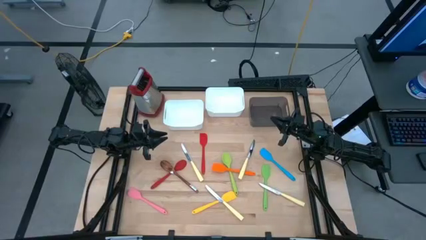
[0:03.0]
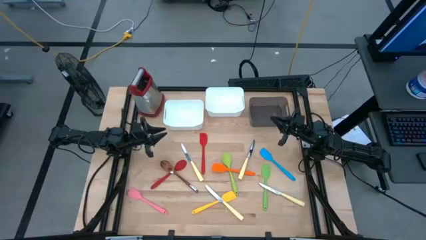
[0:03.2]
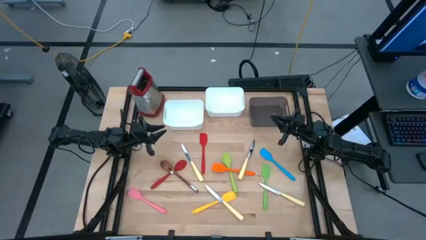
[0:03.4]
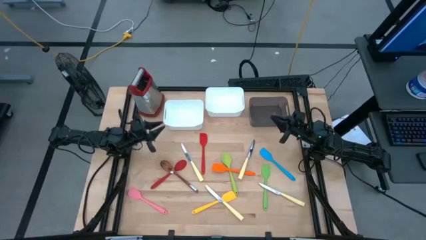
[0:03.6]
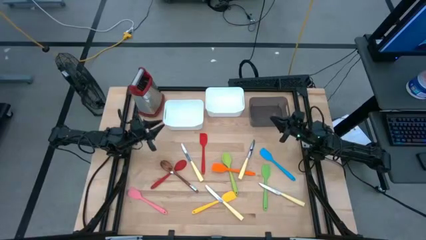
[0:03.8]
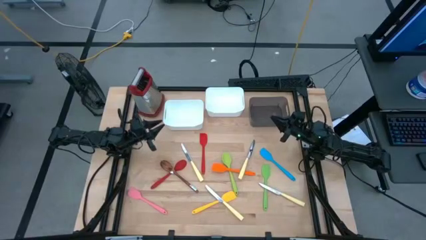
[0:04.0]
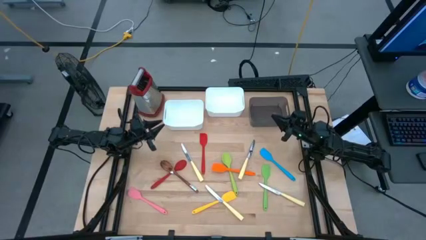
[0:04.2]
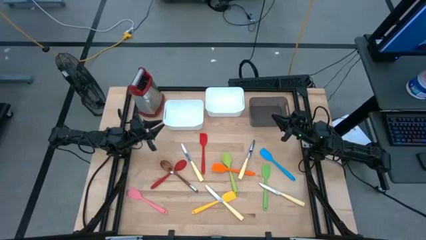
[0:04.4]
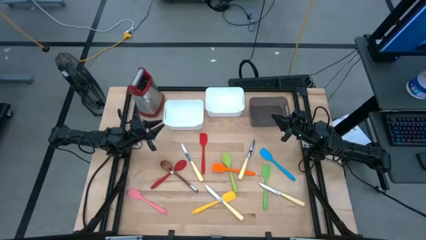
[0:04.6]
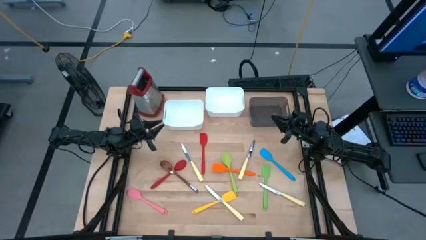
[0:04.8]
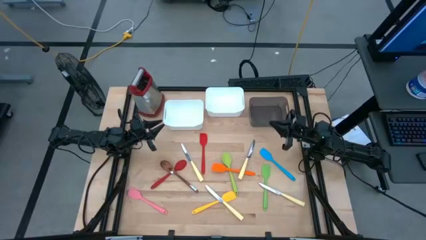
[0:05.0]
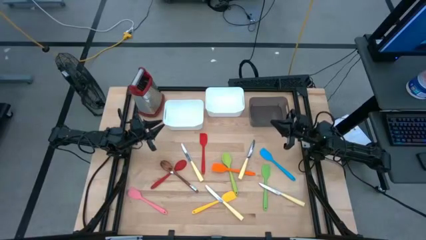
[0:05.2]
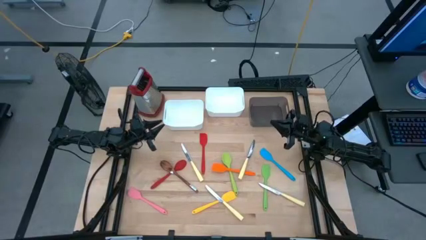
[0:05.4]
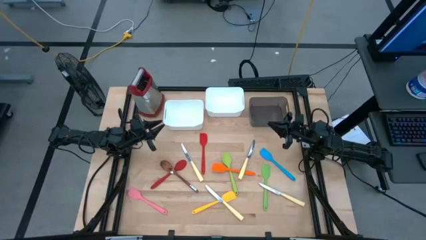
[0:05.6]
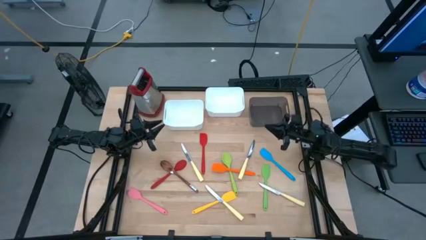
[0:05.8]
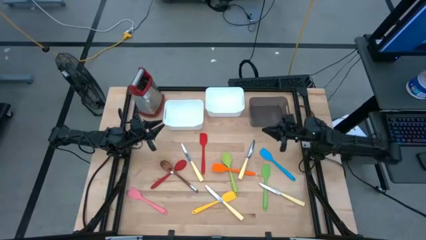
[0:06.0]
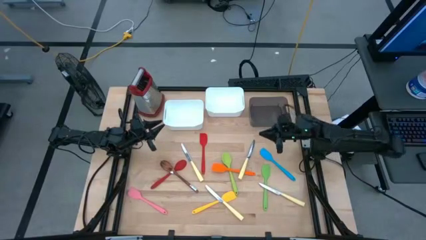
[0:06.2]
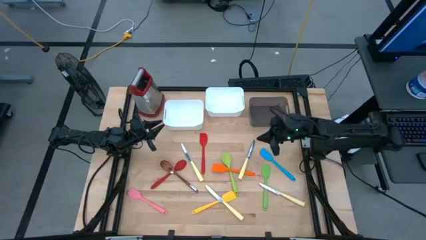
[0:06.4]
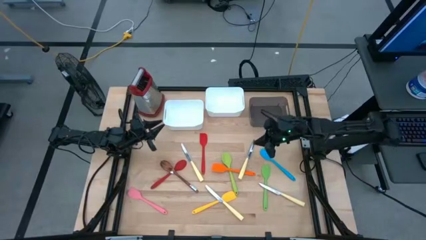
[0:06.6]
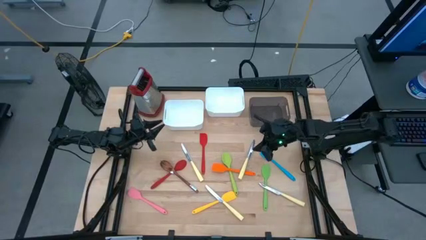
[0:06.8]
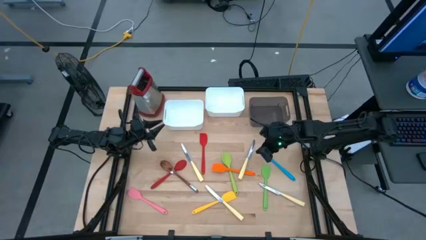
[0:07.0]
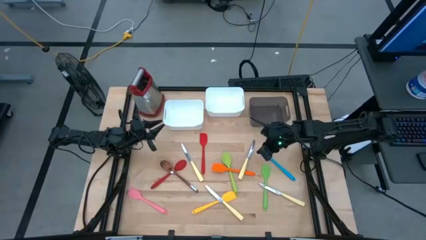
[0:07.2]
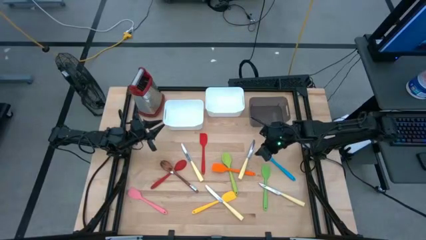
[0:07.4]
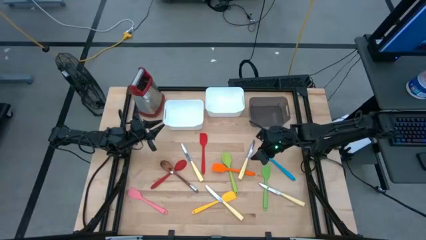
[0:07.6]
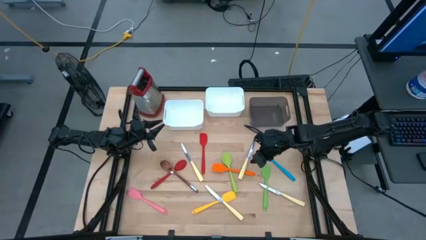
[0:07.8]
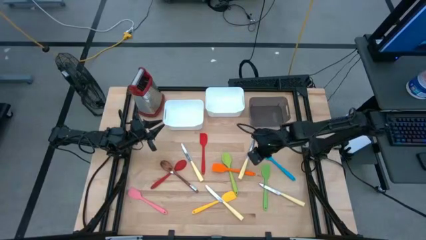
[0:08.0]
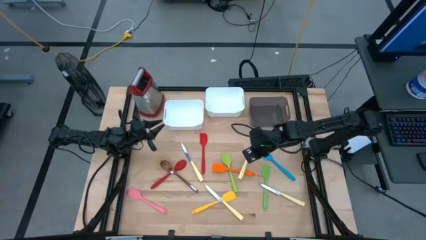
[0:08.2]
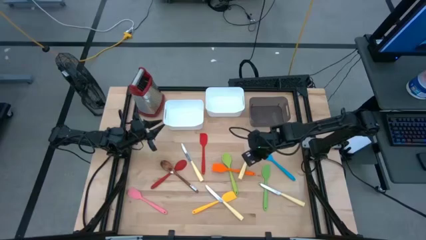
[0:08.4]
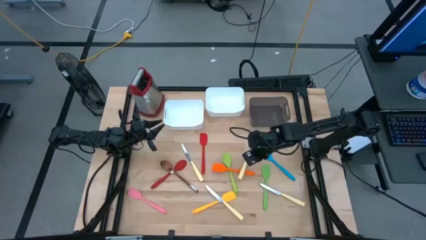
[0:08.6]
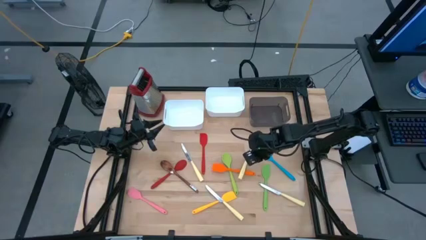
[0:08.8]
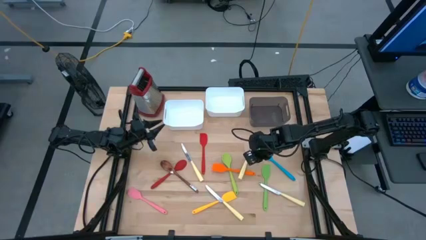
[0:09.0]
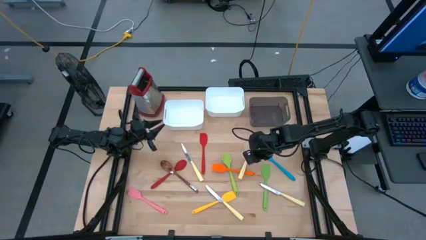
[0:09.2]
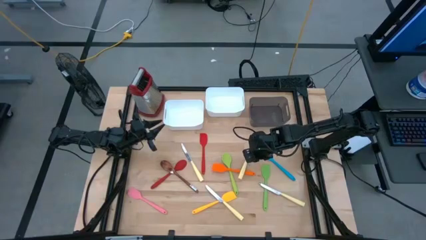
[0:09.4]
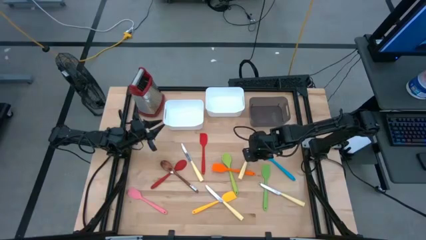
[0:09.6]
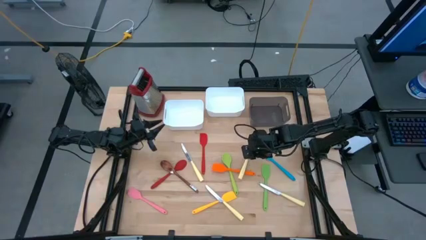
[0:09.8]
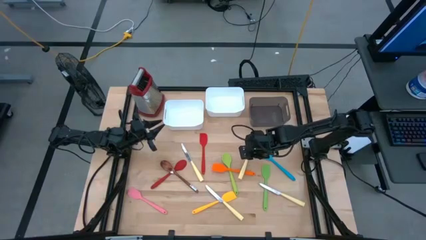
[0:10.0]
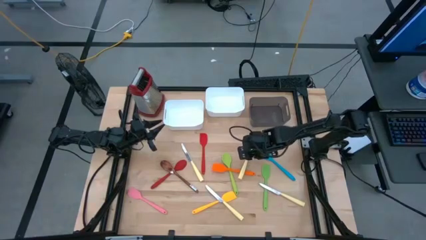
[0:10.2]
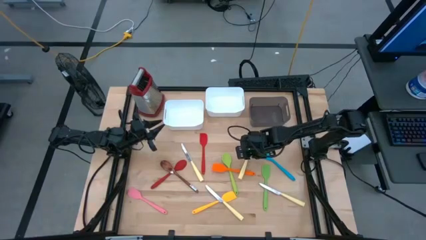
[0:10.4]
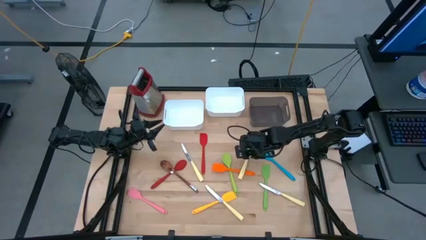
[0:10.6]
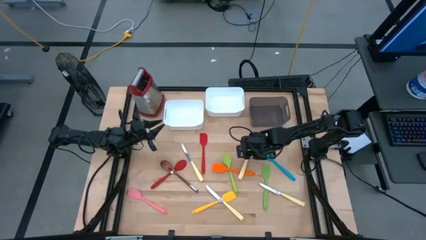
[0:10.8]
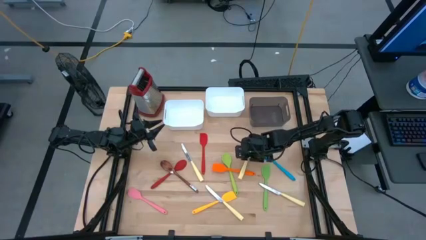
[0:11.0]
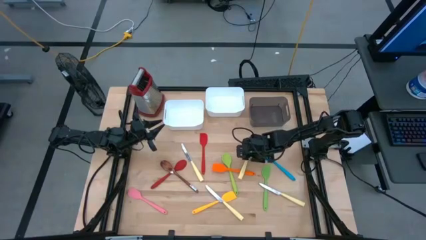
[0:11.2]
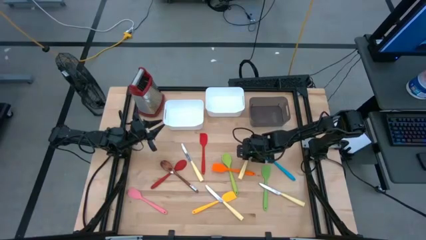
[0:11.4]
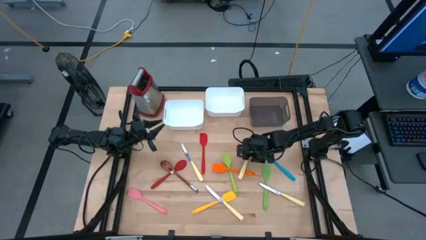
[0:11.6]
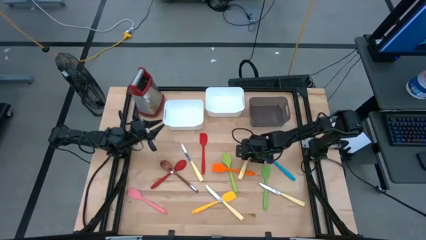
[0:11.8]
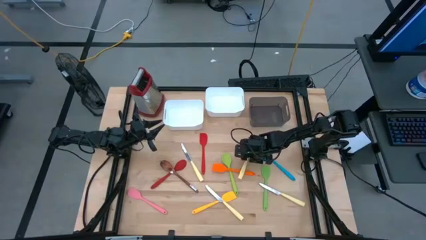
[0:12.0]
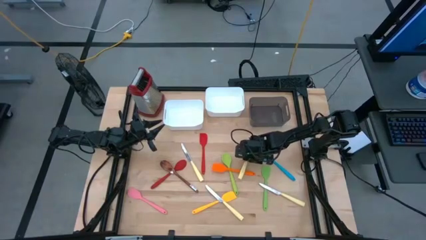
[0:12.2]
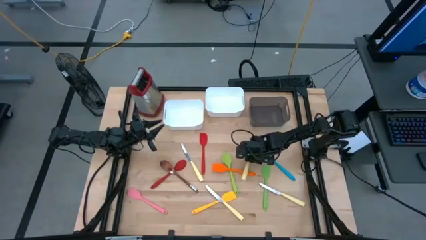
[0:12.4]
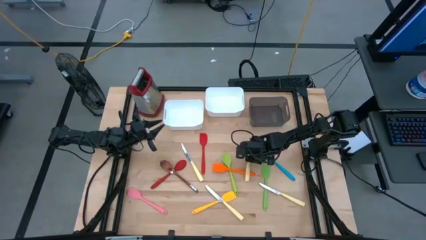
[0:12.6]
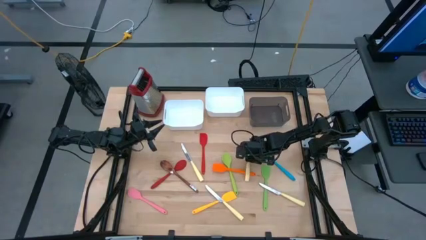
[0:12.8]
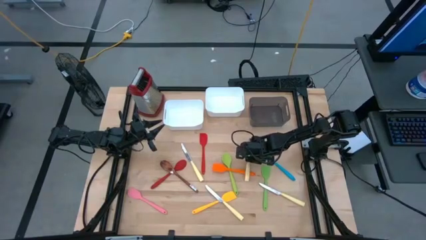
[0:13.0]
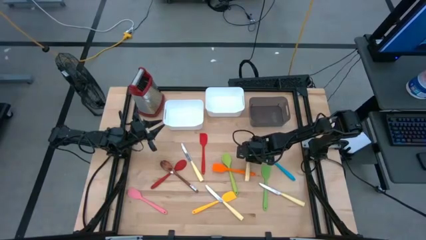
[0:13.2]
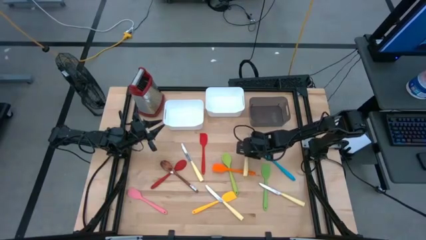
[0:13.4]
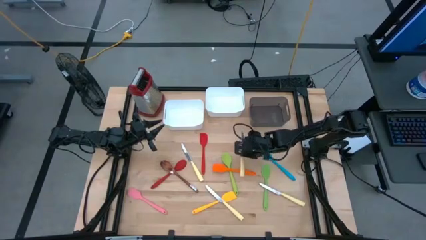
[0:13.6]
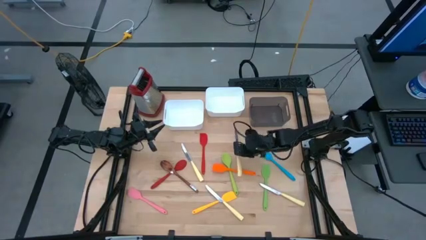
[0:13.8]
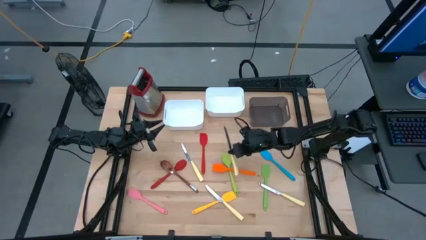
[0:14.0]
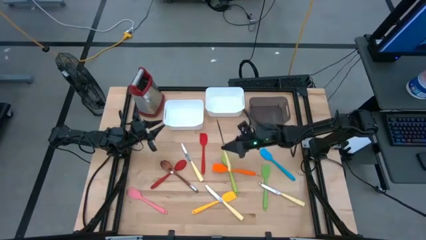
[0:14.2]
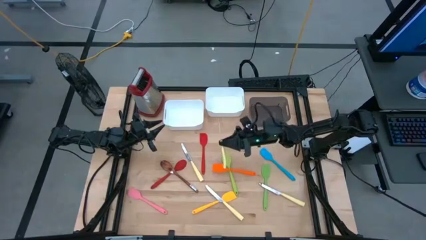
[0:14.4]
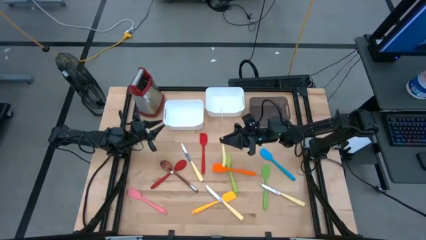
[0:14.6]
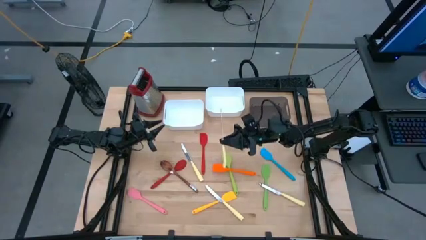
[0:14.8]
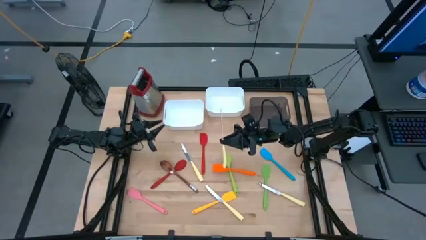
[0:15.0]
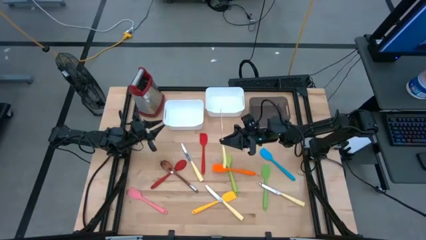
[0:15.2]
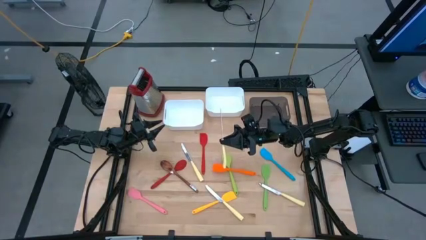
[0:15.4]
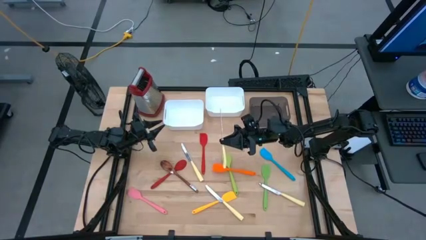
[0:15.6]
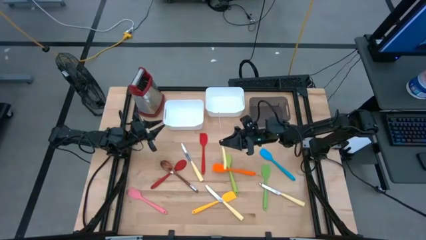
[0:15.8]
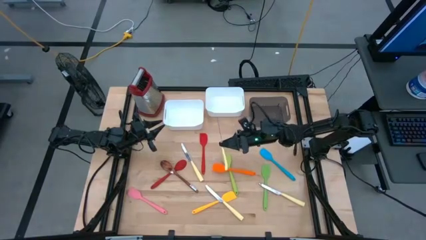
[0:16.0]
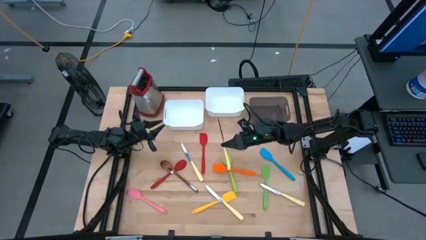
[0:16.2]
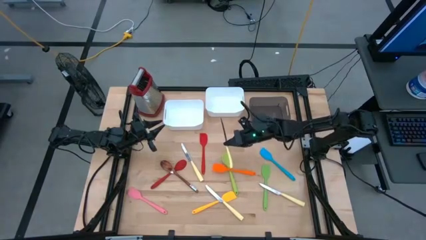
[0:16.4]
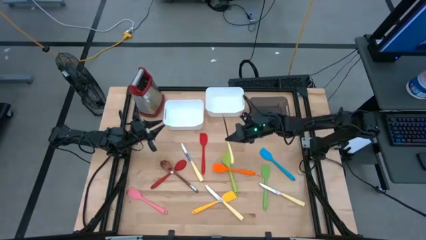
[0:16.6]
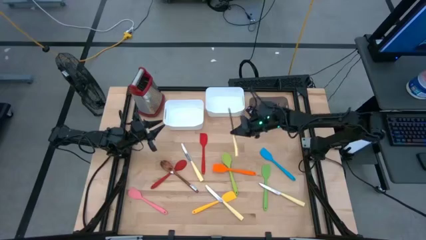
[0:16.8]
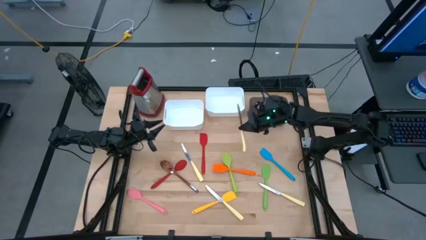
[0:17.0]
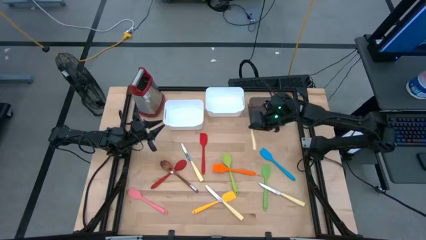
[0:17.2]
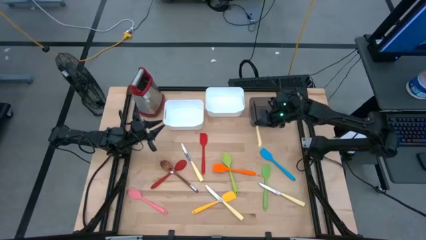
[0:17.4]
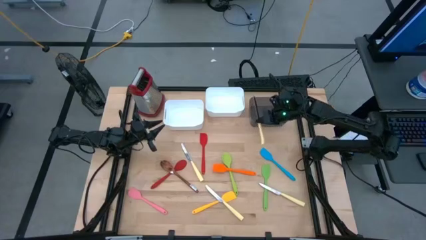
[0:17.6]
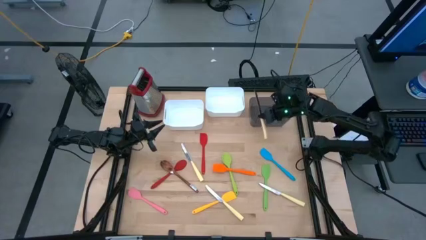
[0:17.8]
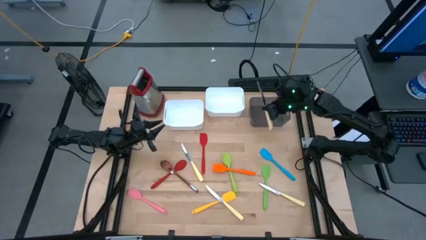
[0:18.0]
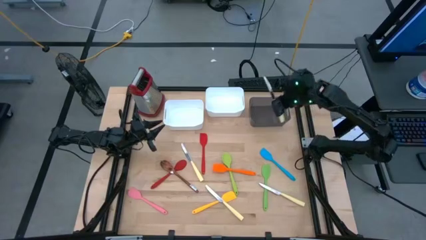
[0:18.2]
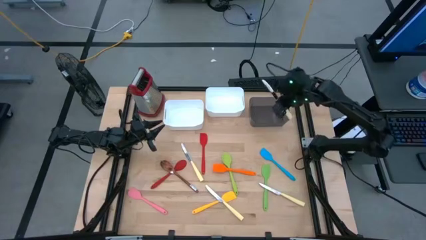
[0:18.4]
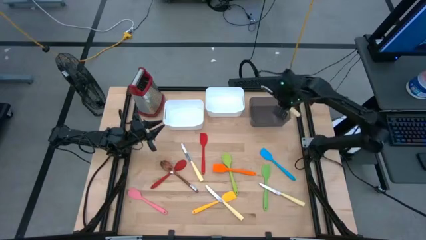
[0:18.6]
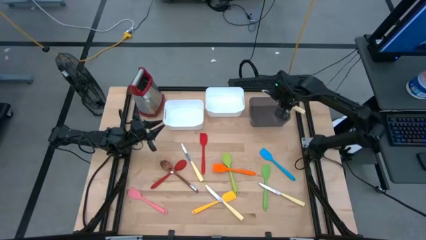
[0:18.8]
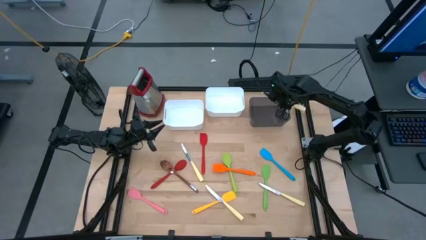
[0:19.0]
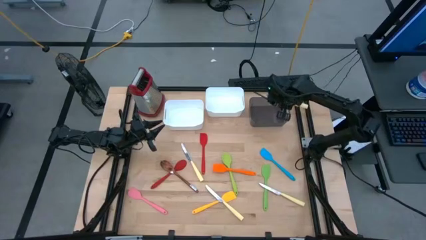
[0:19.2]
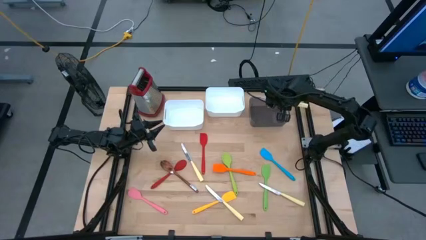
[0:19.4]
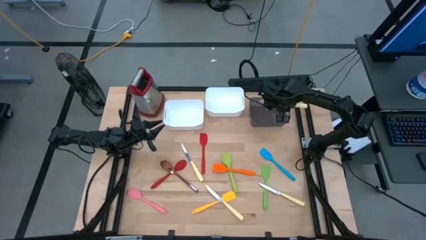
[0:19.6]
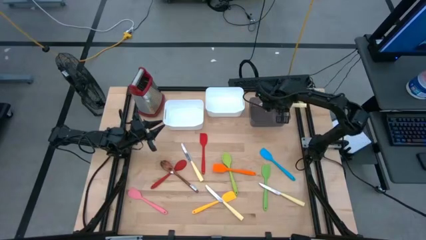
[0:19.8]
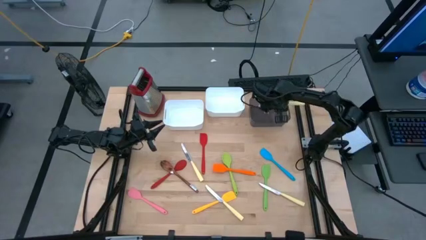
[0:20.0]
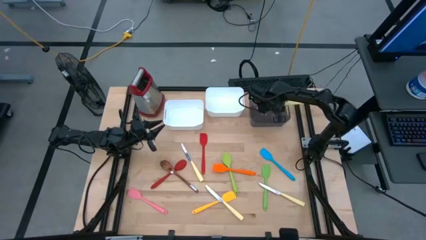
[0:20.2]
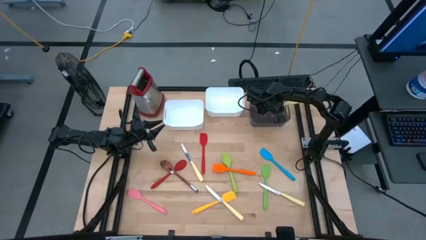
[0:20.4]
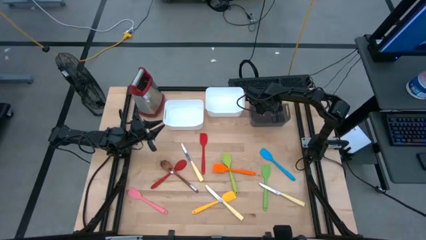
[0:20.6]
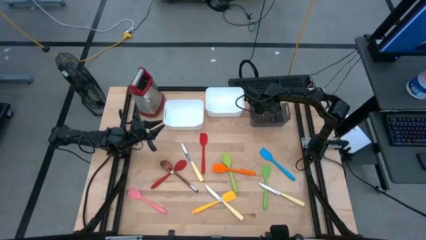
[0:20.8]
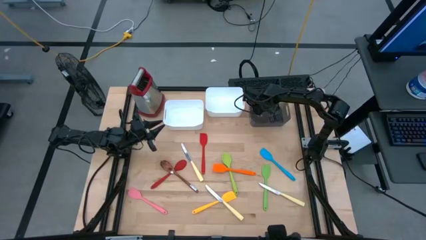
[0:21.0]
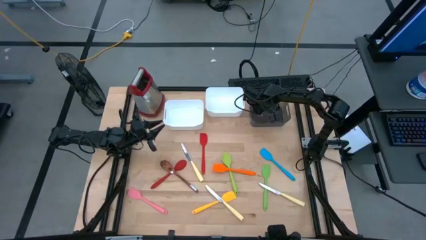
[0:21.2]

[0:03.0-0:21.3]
Task: Pick & Place Kitchen Items
Put the yellow knife into the black bin
